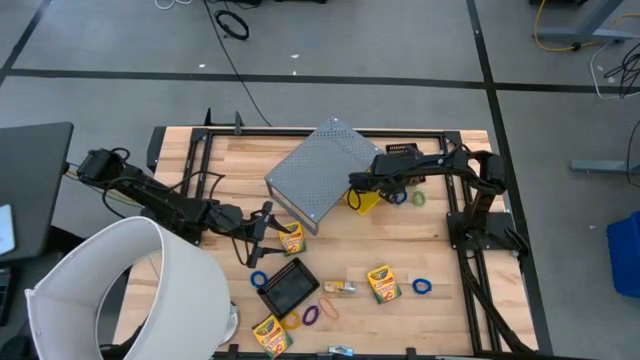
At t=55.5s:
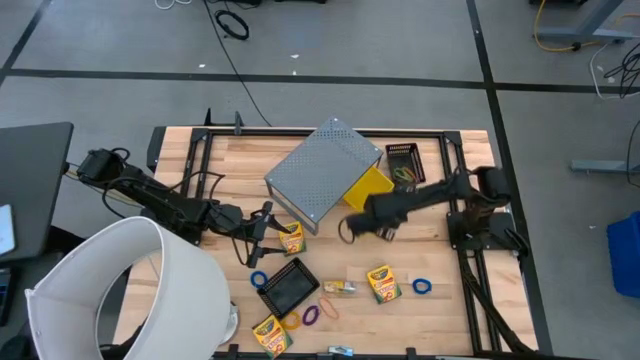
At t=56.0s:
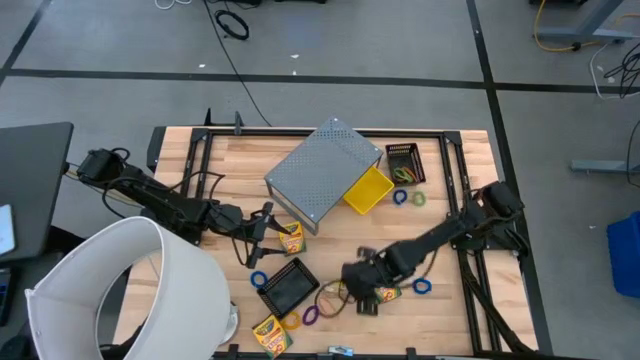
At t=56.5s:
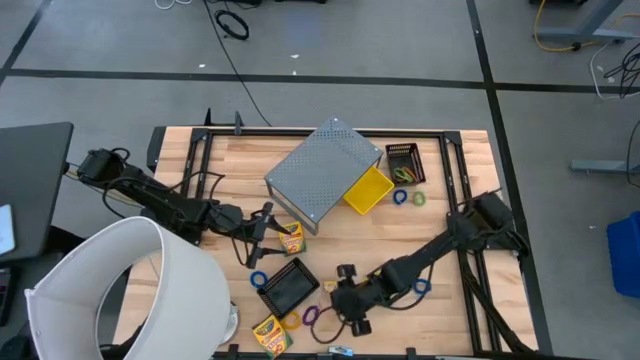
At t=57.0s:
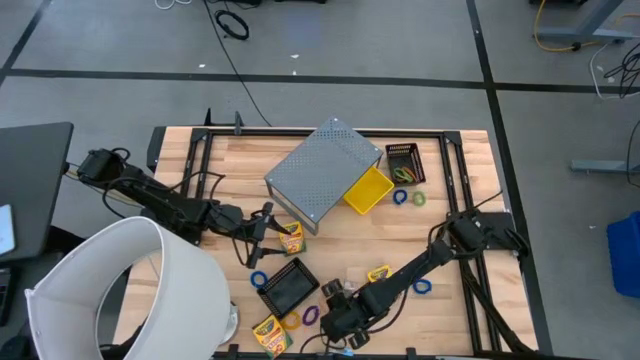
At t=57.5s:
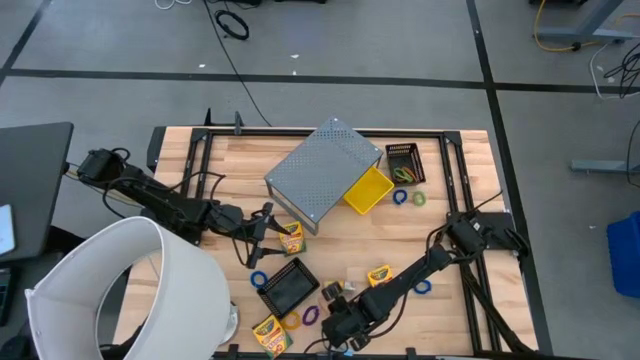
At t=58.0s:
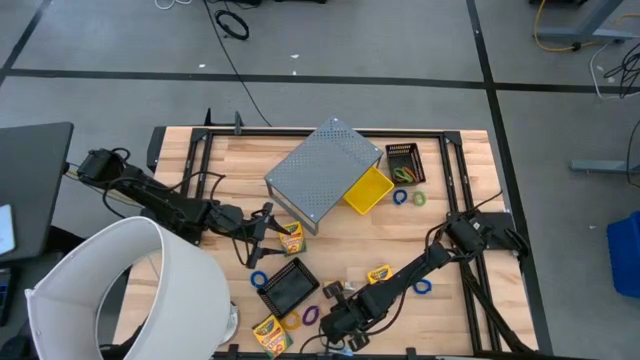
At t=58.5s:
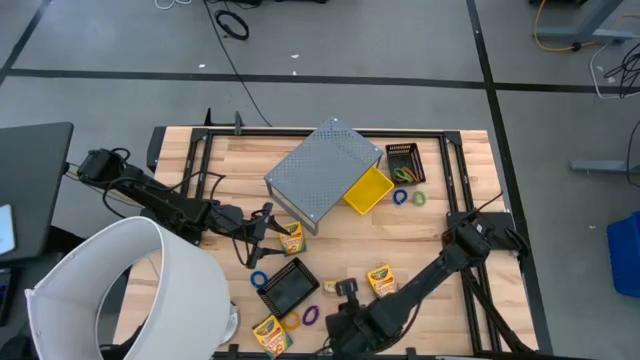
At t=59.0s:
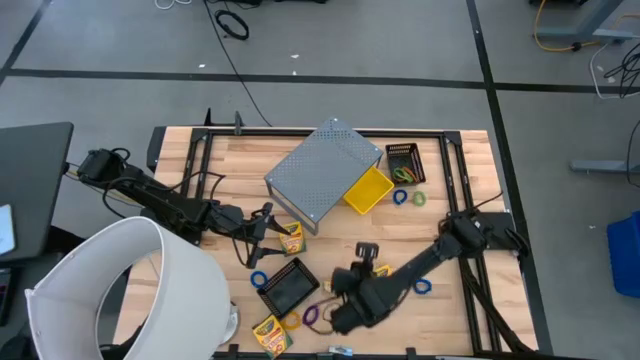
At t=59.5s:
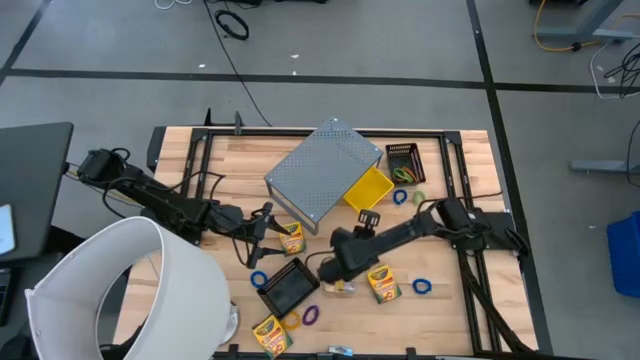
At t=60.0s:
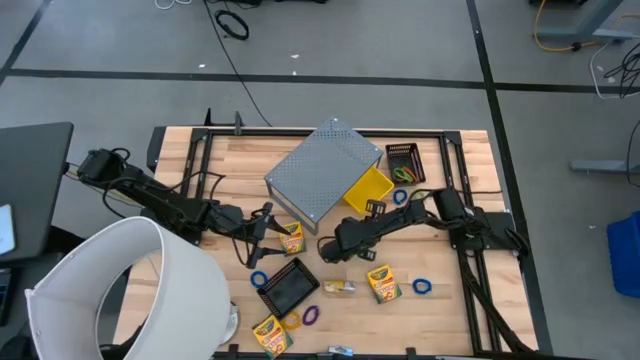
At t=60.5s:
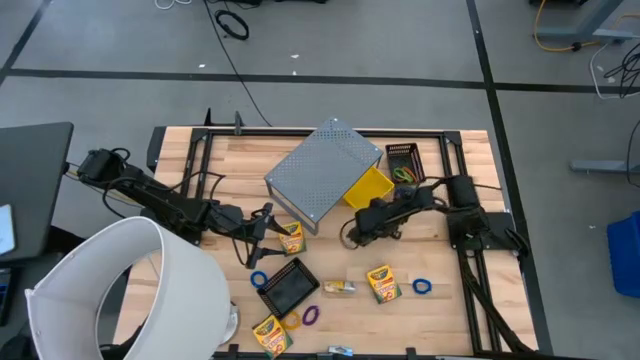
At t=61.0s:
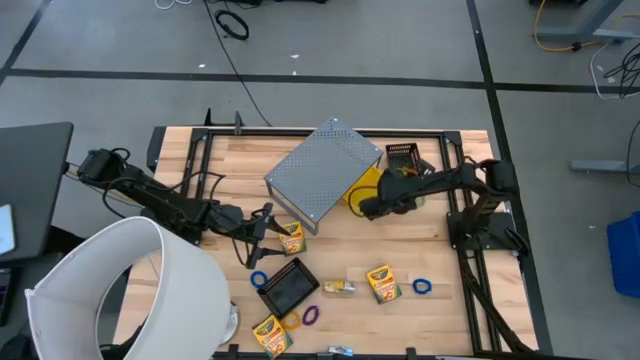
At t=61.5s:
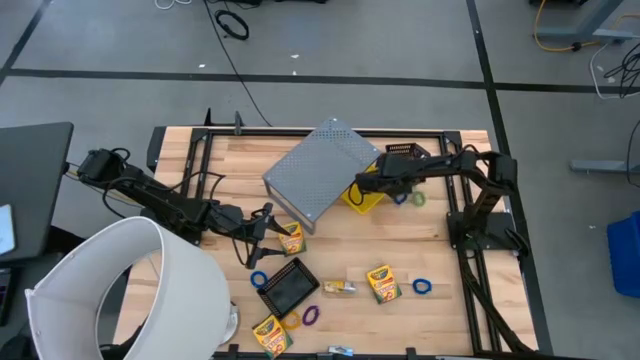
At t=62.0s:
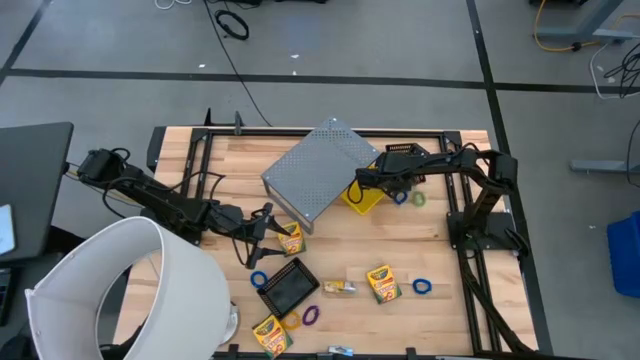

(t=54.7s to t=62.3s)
Task: Pick & Place Office Desk Supplies
Put the orange rubber band into the top black bin

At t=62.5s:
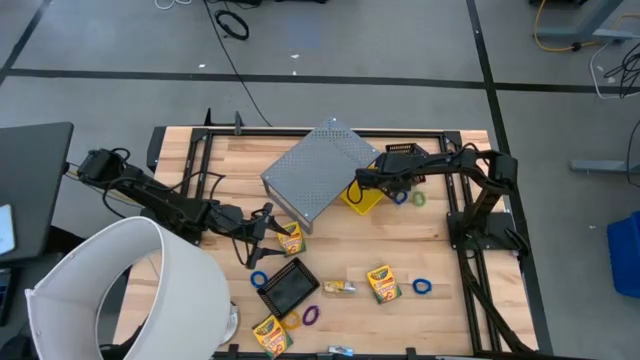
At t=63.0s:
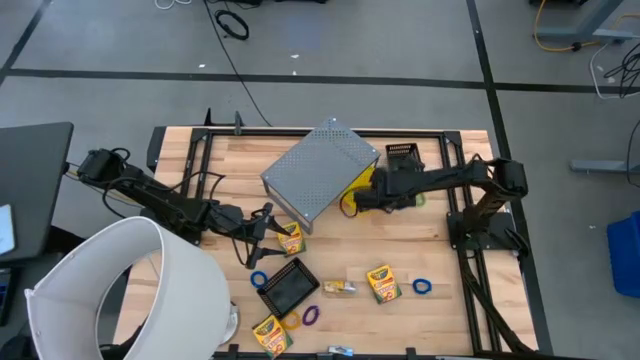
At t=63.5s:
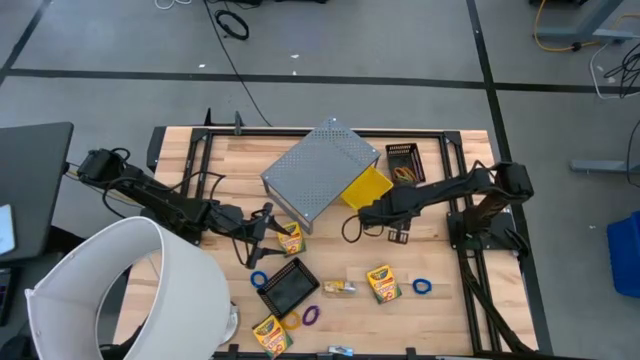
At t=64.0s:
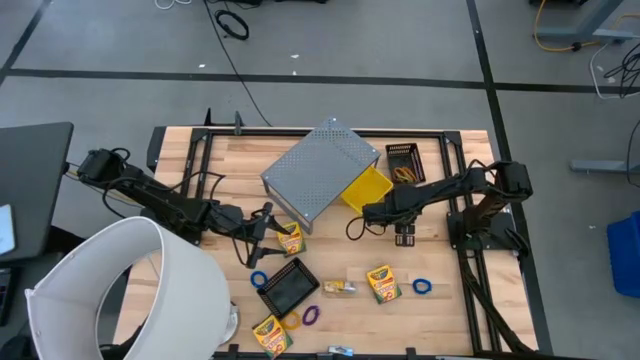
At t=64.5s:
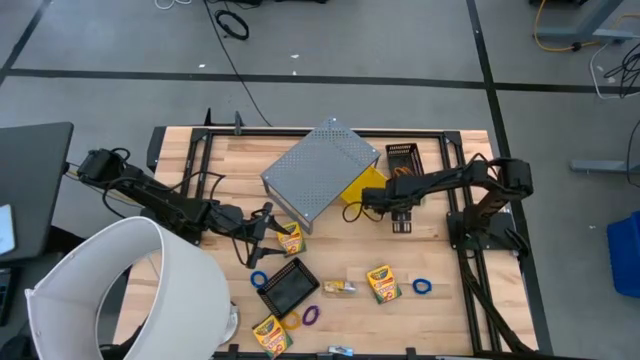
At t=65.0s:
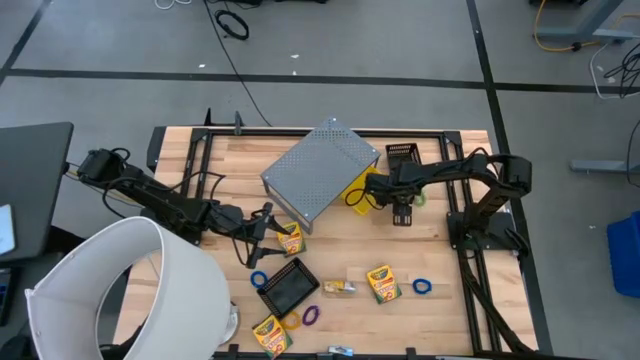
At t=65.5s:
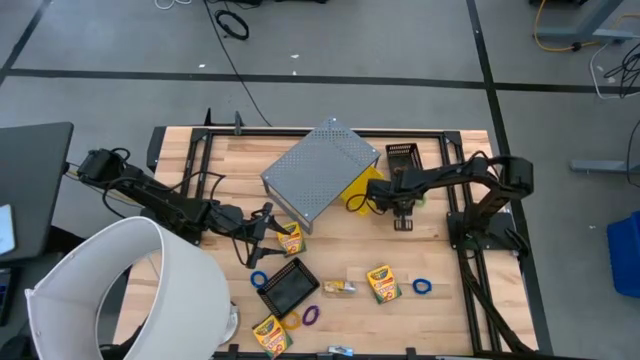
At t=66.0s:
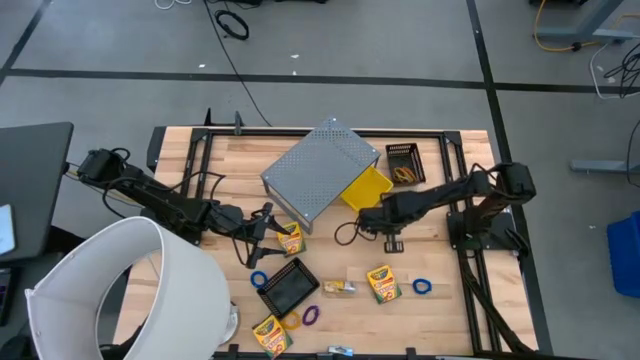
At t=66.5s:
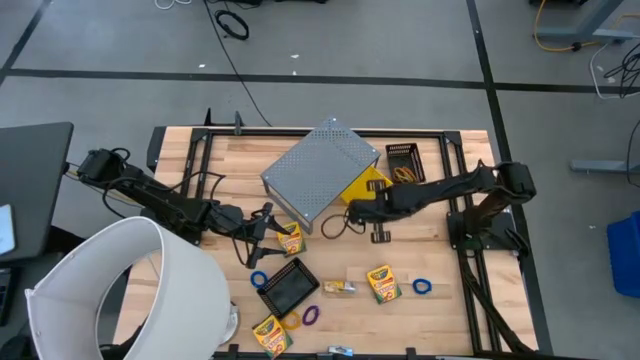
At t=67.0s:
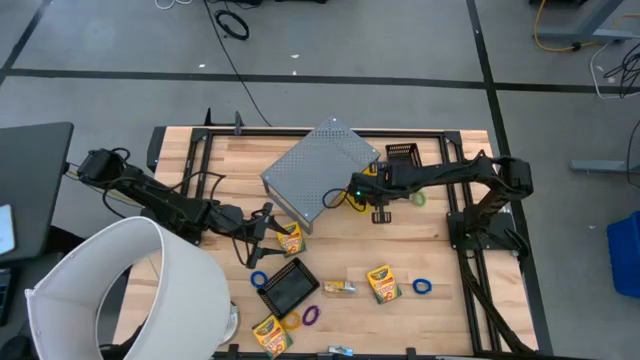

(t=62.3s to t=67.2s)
Put the blue spring keychain into the yellow bin

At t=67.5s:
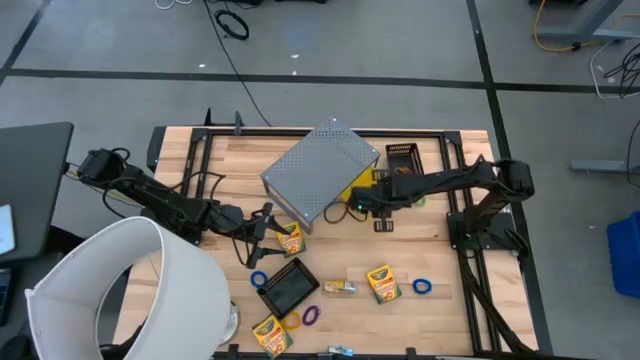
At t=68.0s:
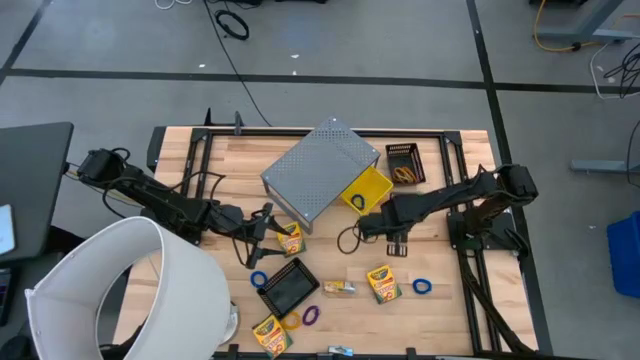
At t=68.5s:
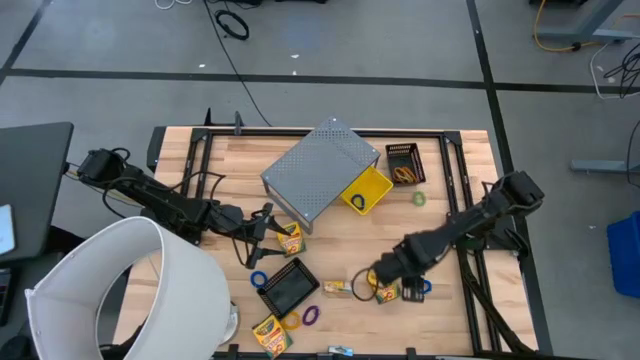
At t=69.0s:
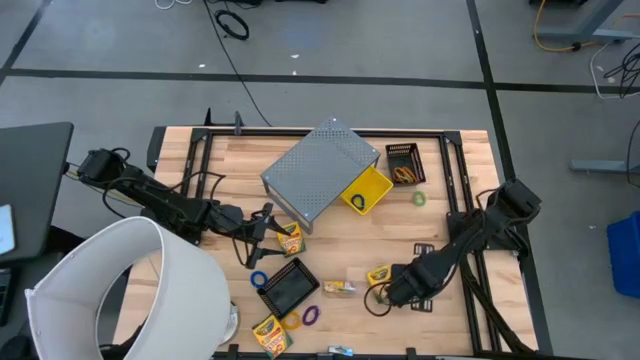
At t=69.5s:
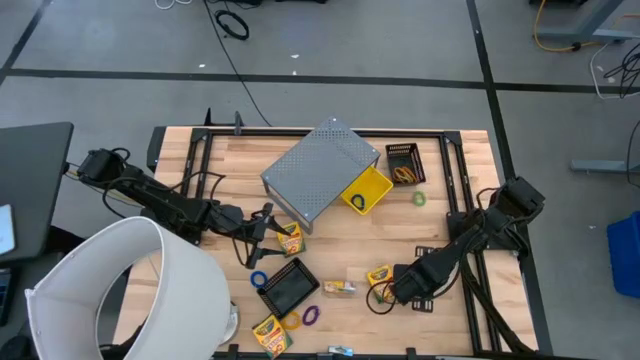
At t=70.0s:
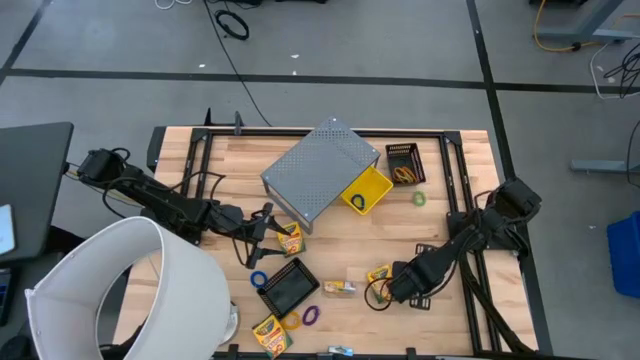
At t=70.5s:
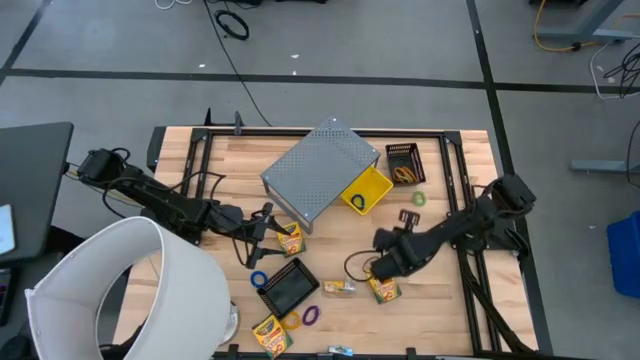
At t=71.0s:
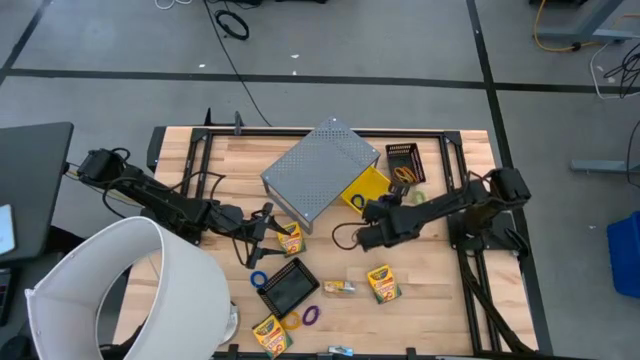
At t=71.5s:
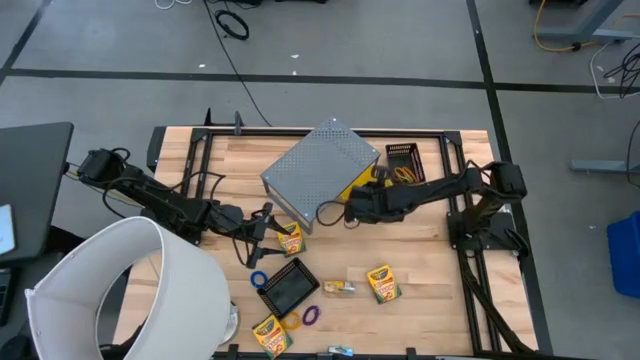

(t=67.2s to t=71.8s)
Put the blue spring keychain into the yellow bin

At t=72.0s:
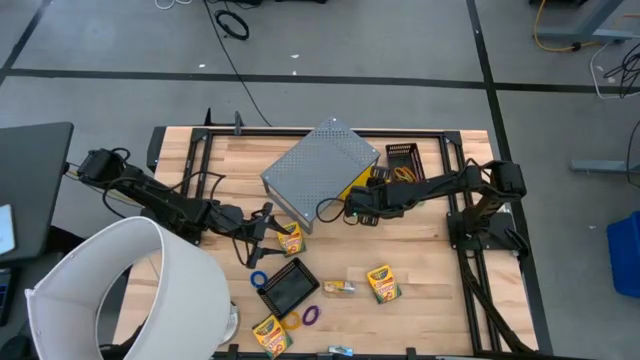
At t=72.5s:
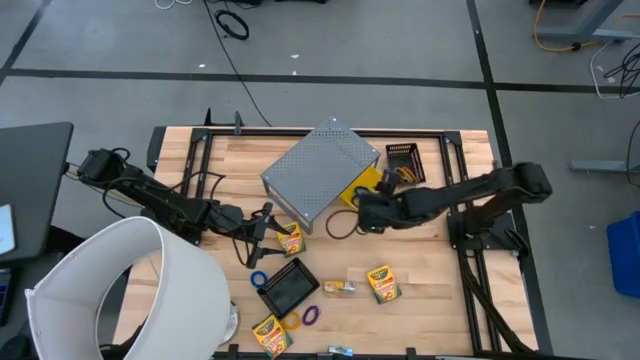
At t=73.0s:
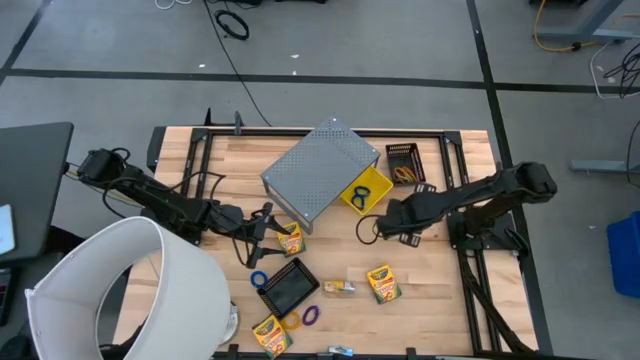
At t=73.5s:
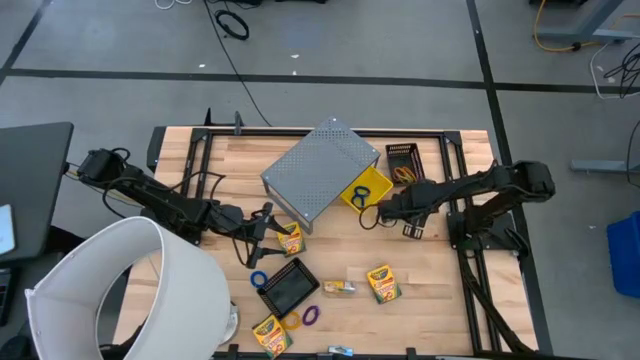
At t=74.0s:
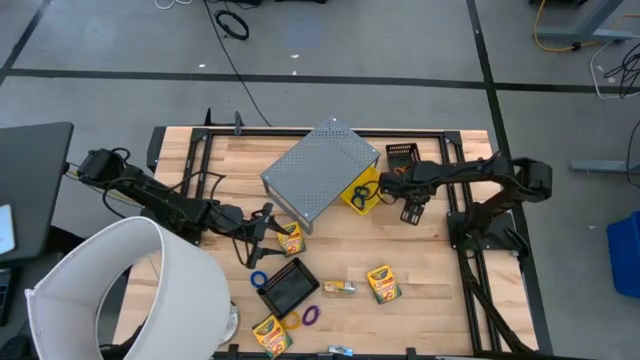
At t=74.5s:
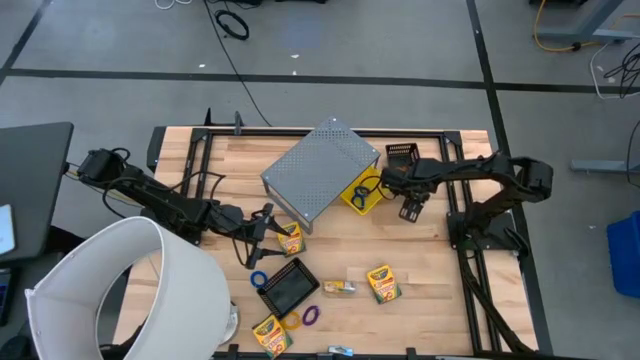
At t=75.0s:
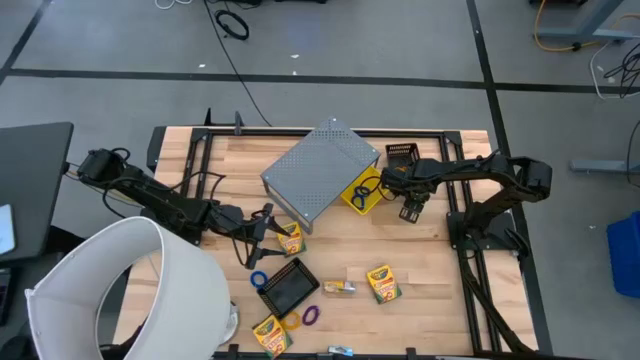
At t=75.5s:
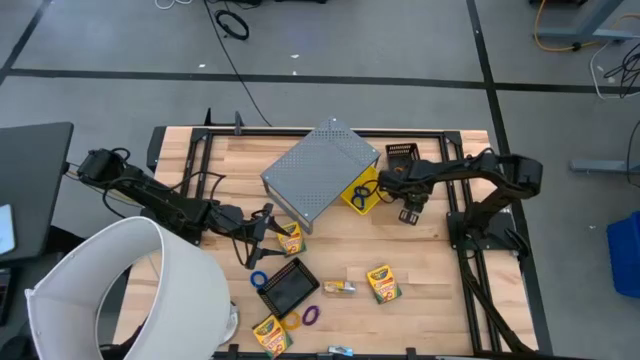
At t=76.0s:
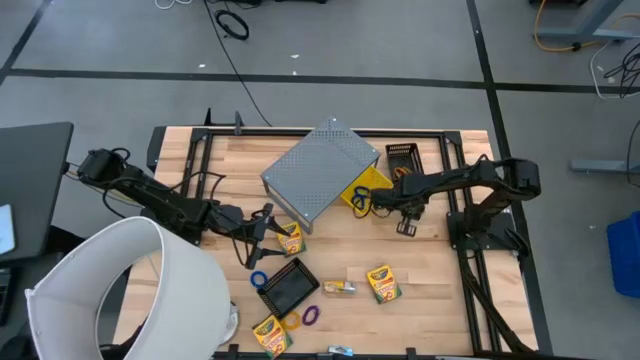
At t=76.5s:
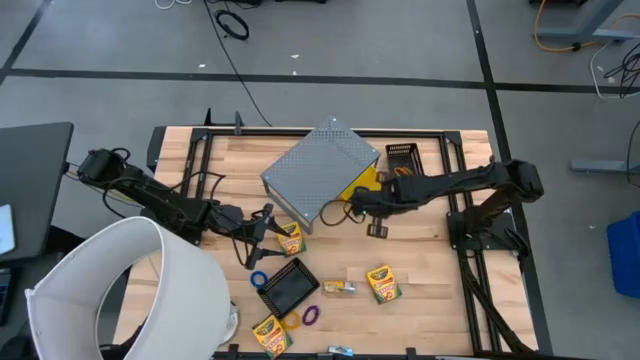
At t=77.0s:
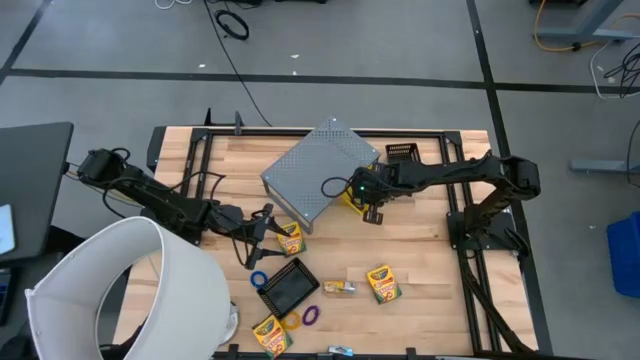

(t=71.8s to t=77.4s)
Put the green spring keychain into the yellow bin
